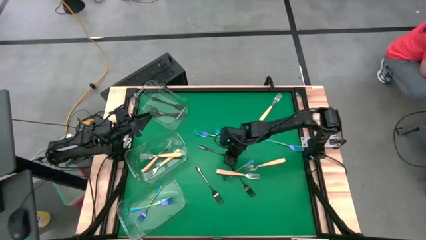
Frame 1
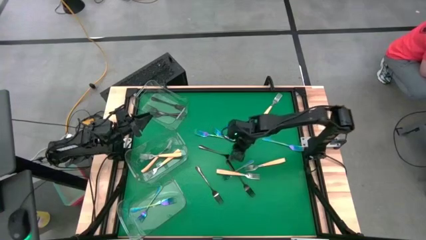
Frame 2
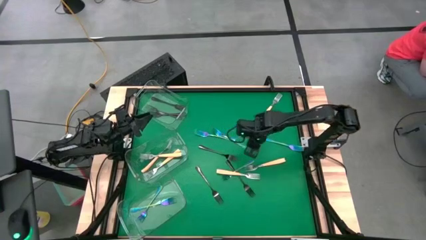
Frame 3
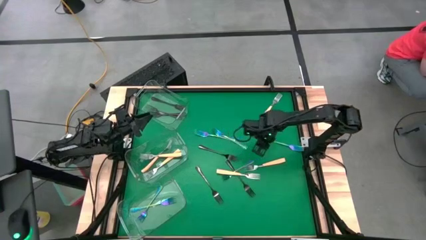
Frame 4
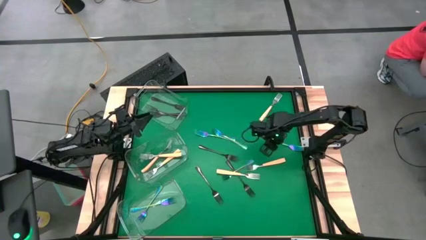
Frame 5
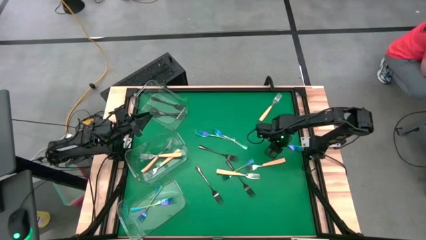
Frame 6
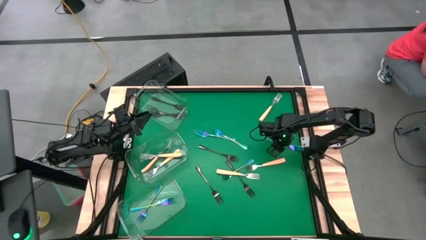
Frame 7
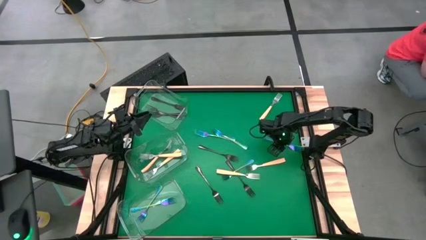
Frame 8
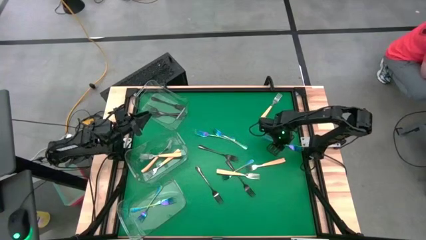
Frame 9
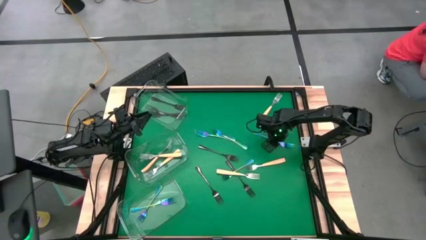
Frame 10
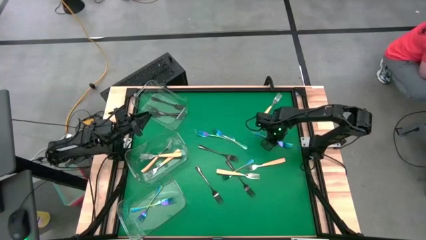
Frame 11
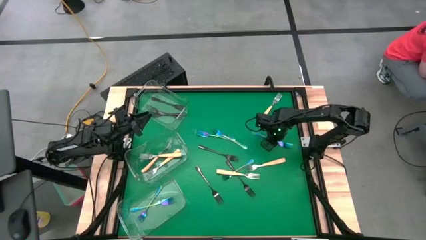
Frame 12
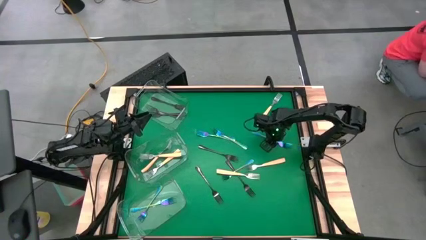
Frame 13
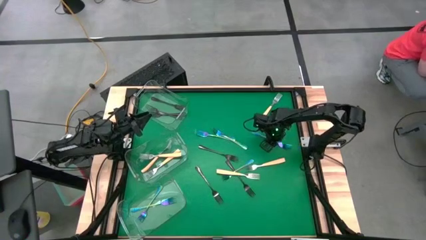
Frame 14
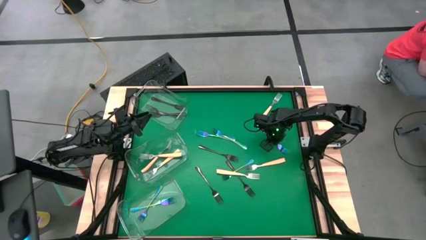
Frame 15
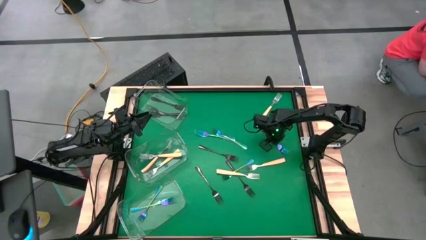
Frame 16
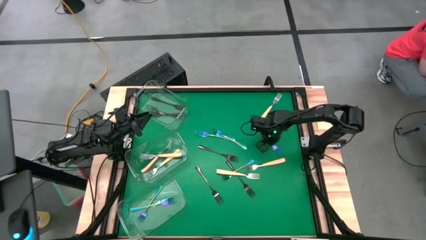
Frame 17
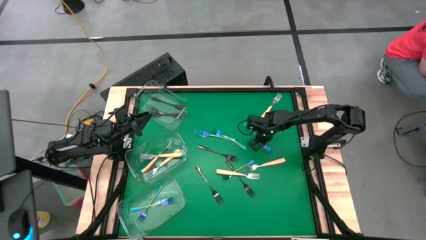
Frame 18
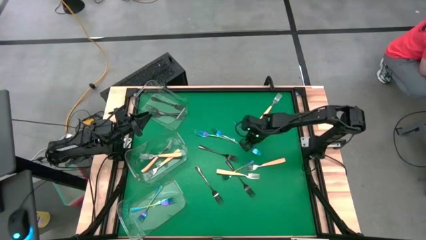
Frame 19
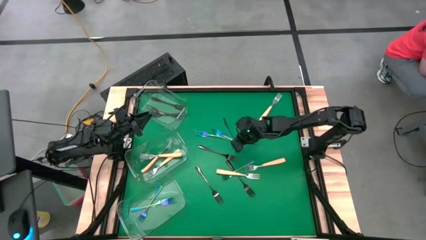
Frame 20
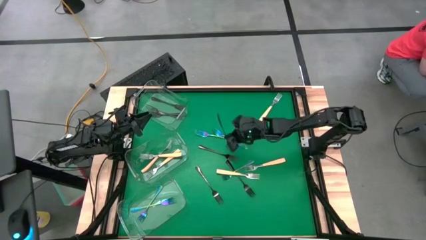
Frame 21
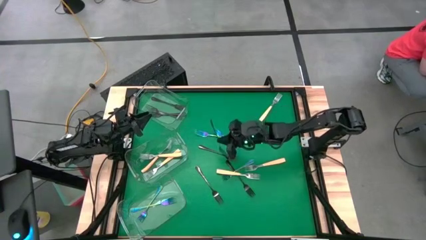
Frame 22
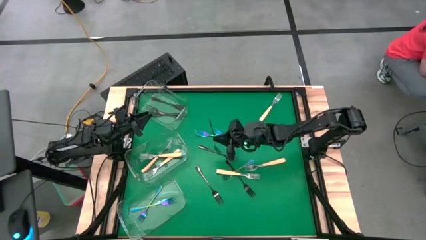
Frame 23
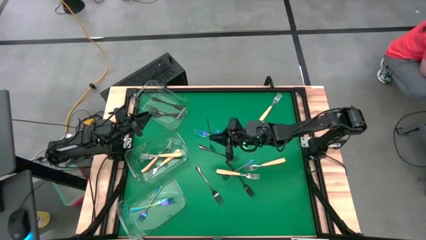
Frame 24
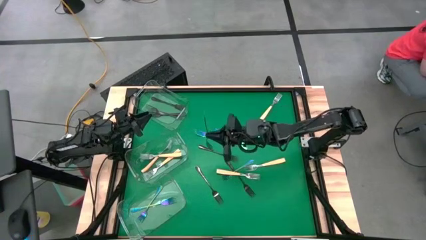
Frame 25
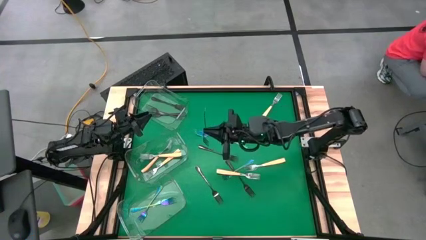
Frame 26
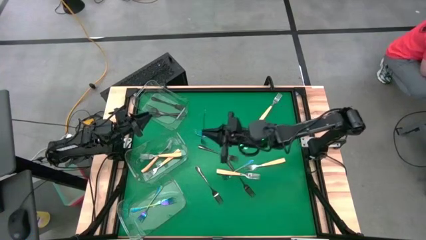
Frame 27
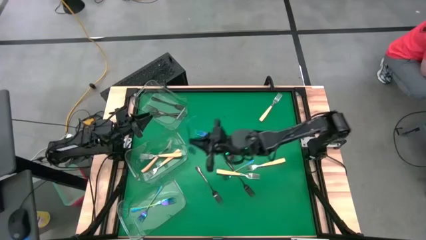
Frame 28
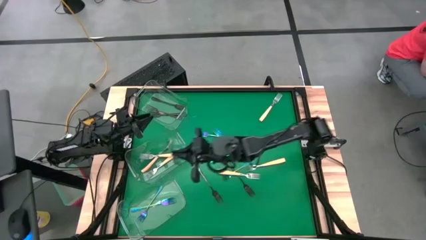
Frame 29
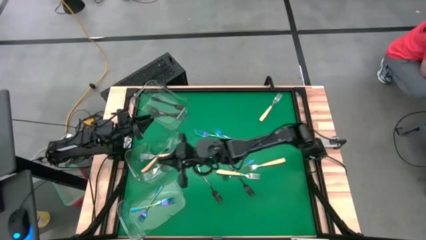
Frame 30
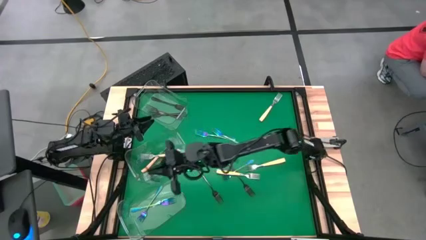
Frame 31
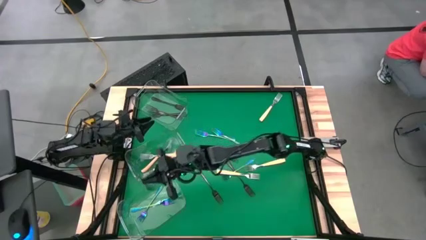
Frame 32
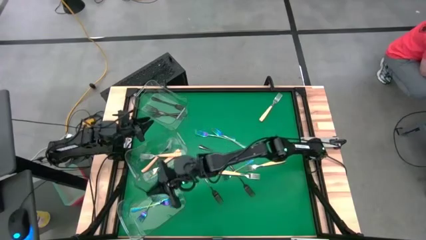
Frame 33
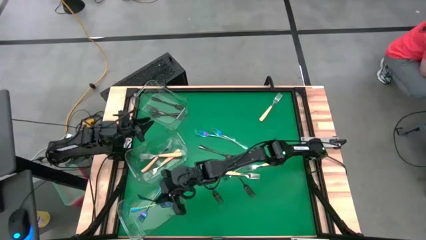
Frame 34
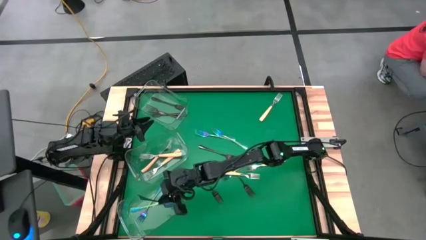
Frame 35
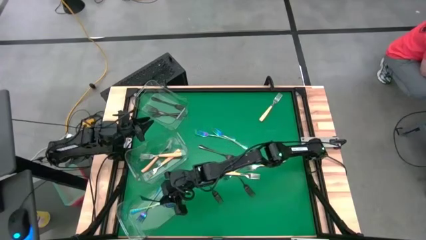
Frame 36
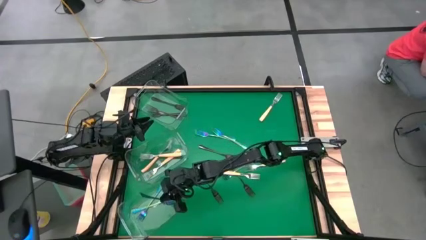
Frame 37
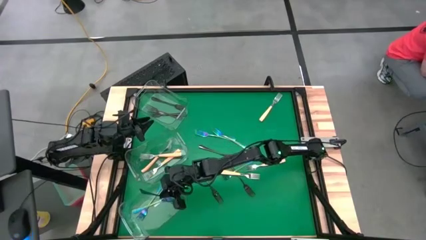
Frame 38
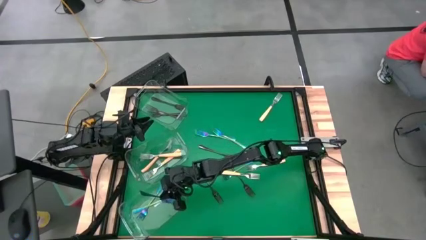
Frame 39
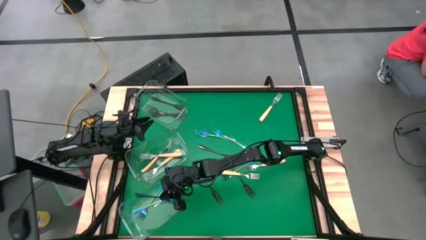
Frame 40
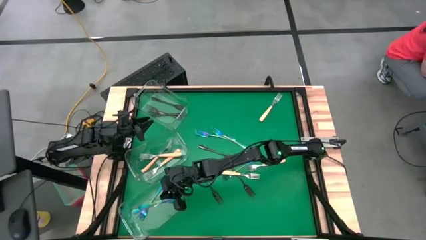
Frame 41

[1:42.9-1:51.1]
Task: Sort silverware by color (type)
Put the blue fork into the bottom transparent bin

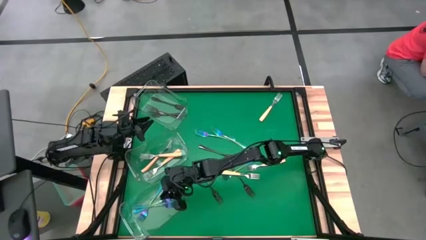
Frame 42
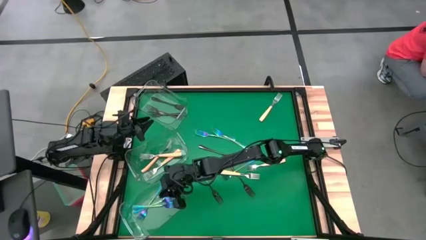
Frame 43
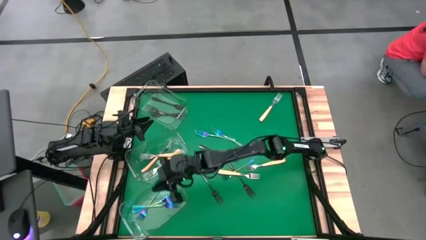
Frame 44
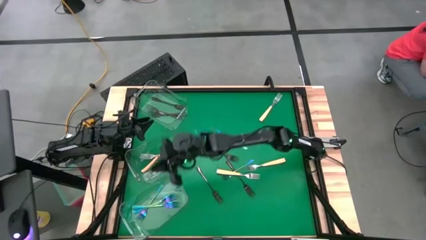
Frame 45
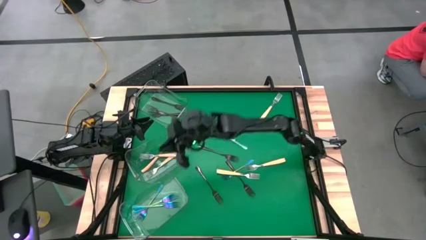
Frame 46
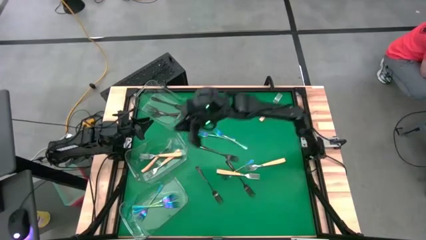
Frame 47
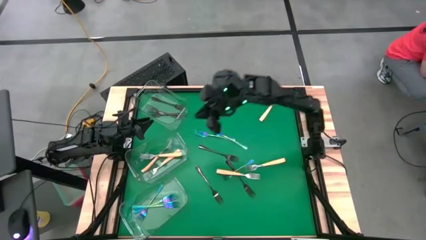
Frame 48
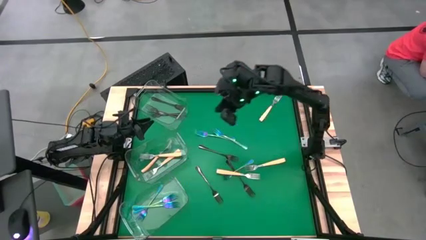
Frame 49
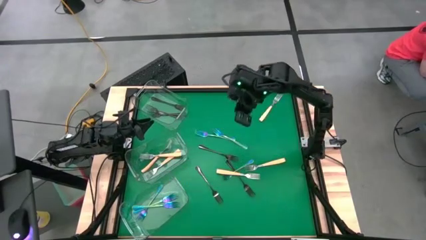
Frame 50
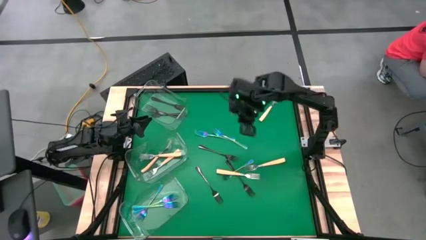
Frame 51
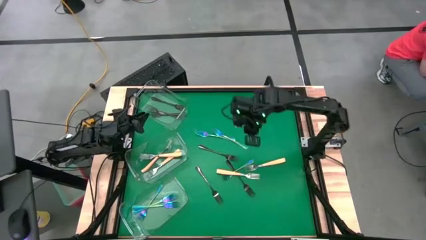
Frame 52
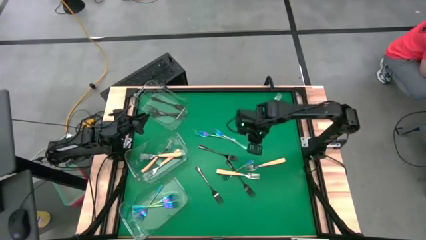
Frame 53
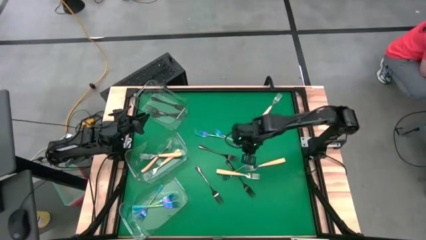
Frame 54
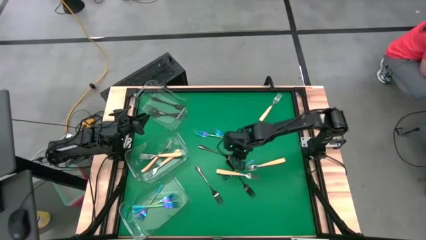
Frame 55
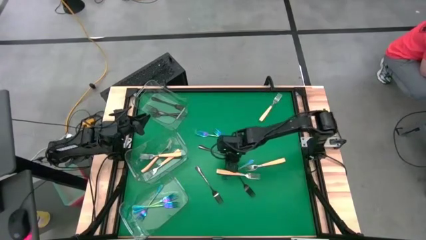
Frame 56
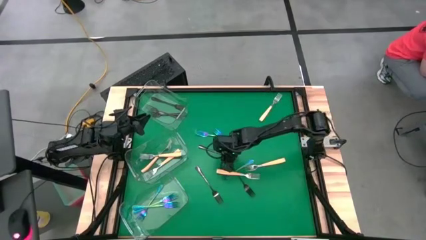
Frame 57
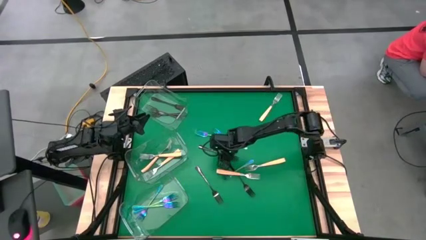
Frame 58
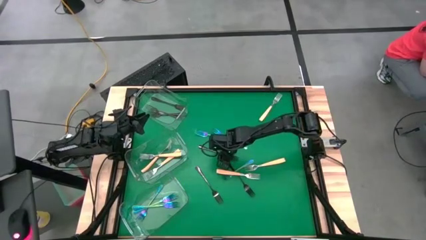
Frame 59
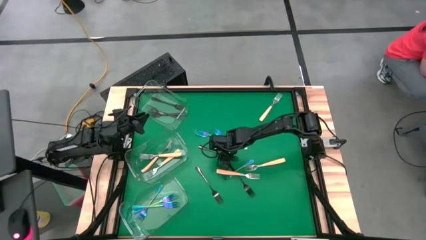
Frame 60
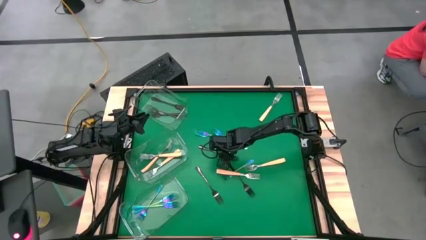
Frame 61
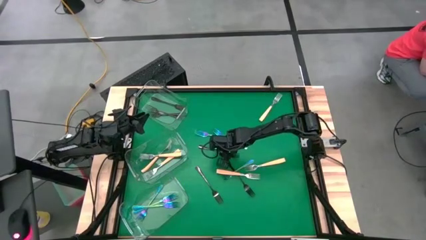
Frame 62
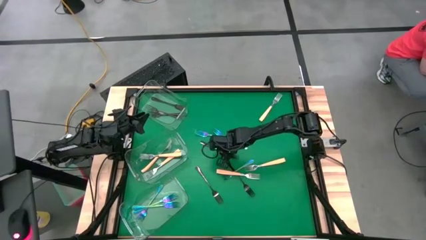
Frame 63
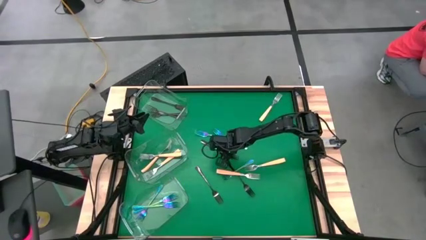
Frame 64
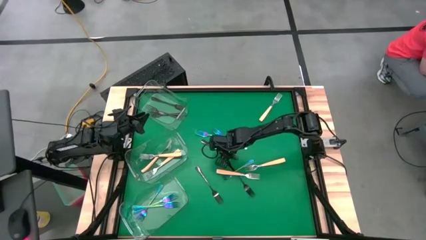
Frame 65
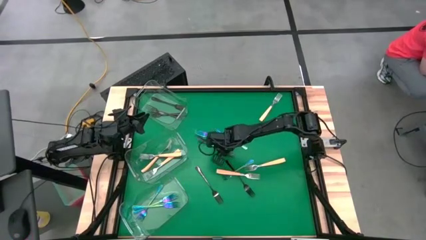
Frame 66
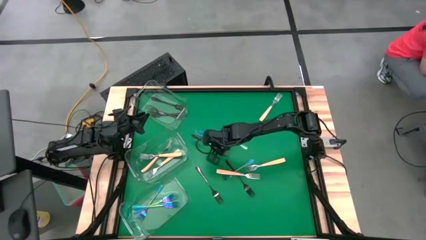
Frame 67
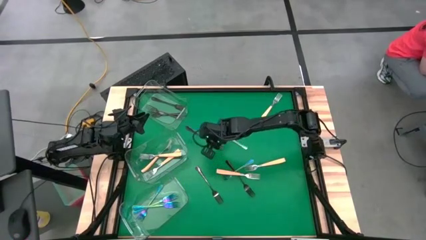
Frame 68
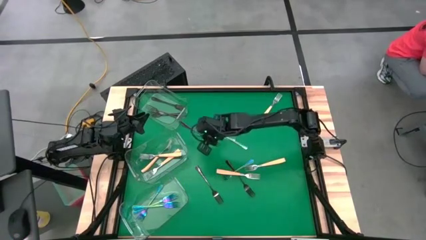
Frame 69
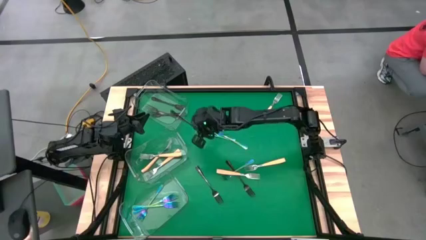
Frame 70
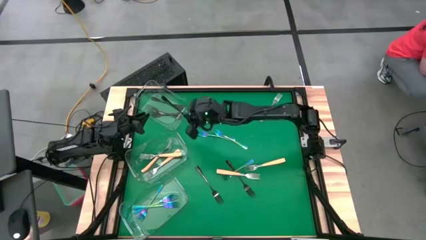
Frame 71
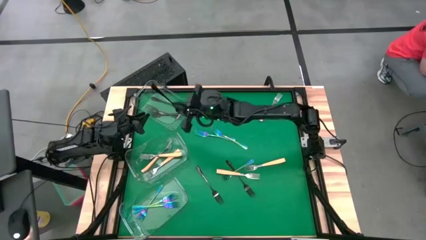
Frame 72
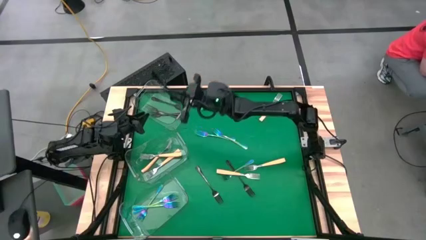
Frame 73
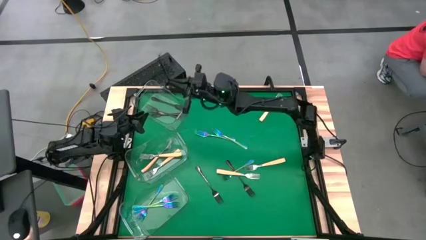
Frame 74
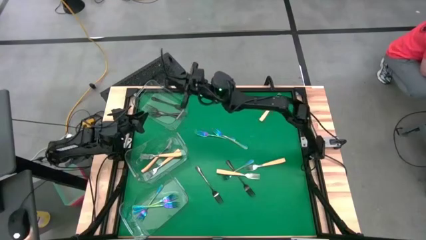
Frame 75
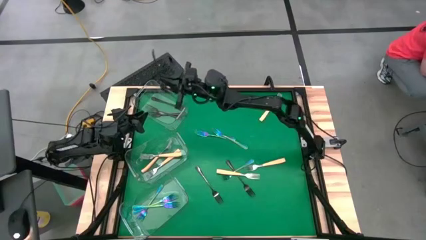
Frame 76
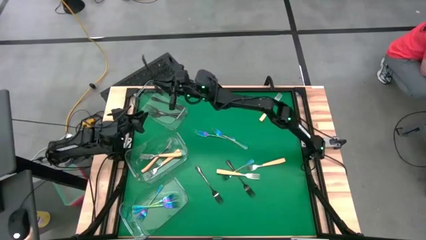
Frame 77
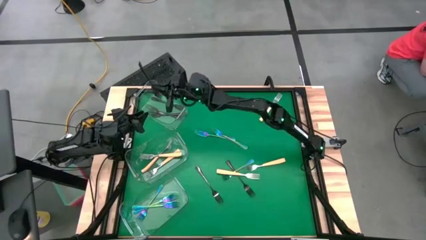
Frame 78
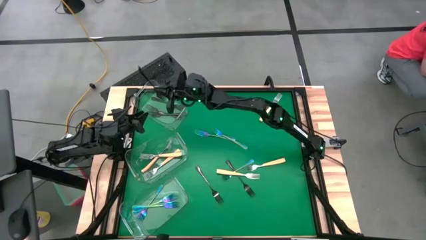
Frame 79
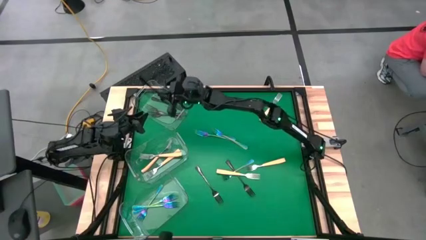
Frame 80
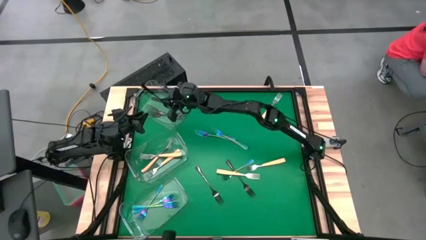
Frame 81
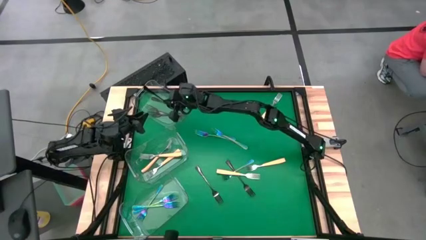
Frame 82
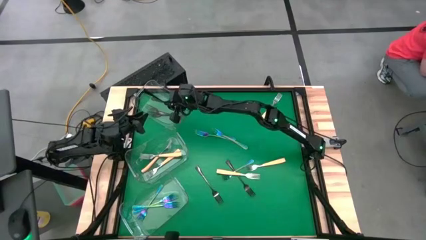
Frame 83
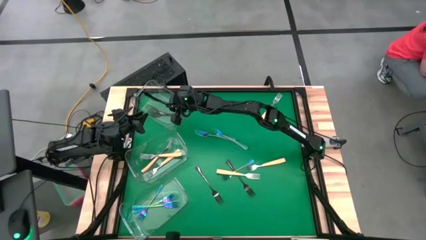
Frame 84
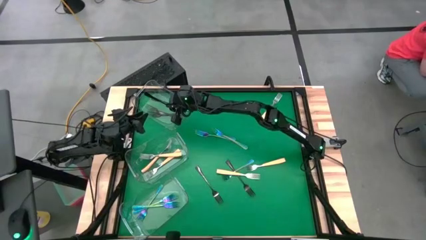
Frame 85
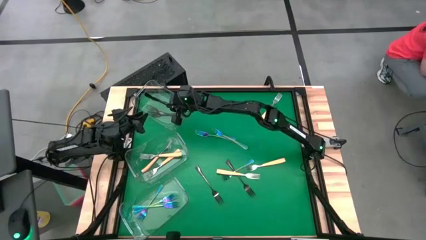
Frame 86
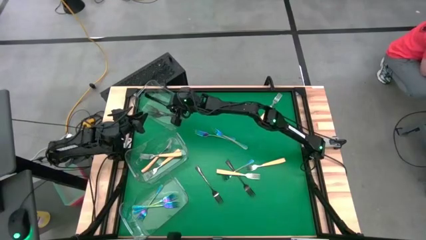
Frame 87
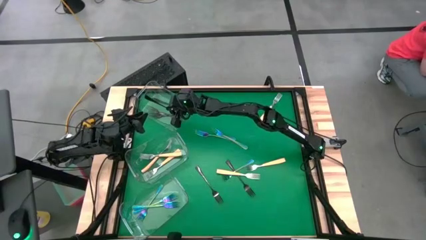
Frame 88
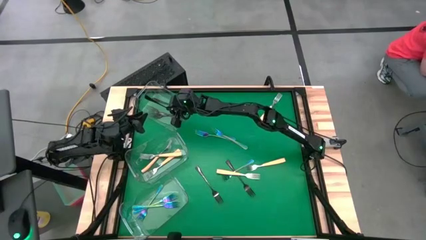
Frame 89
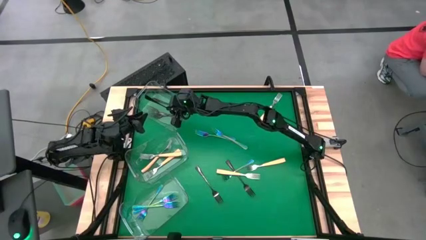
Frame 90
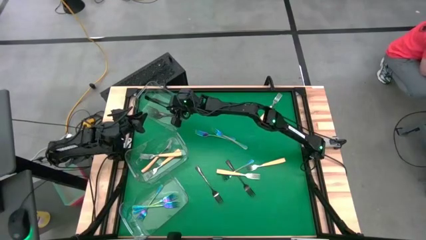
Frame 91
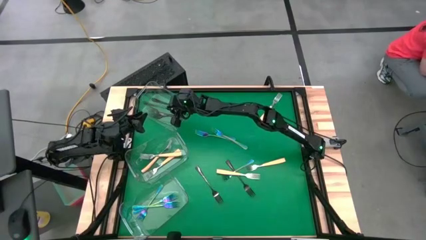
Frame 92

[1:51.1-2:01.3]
Put the black fork into the top transparent bin
